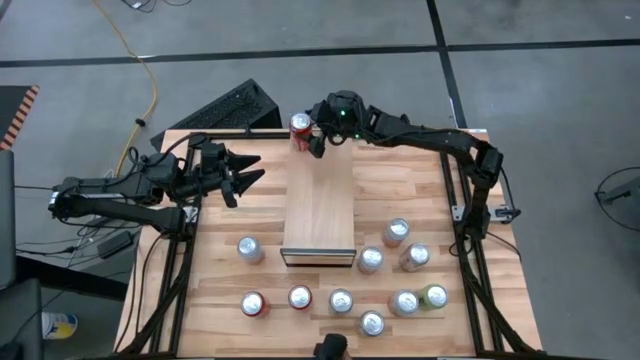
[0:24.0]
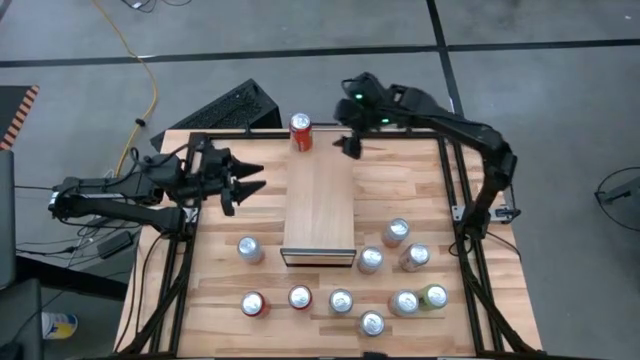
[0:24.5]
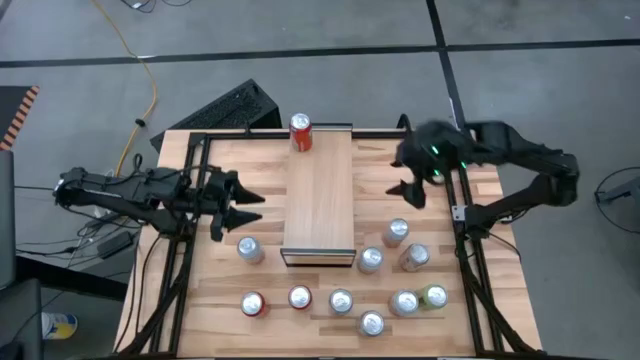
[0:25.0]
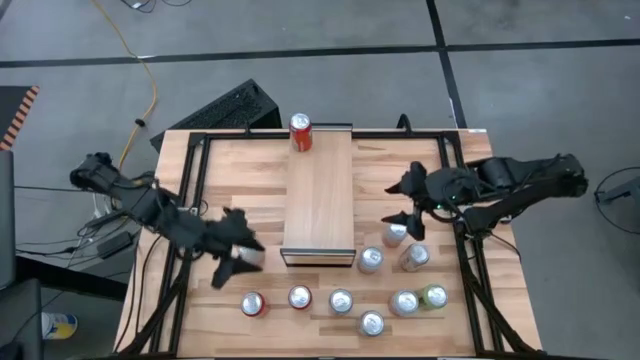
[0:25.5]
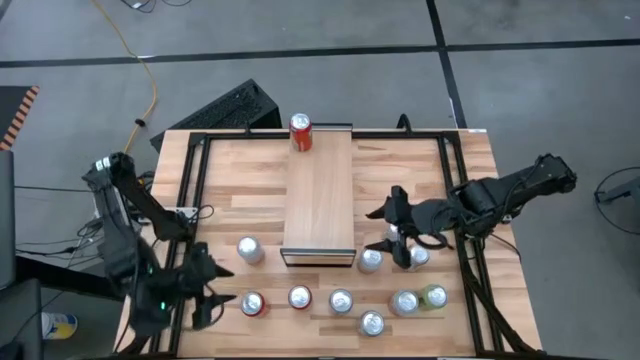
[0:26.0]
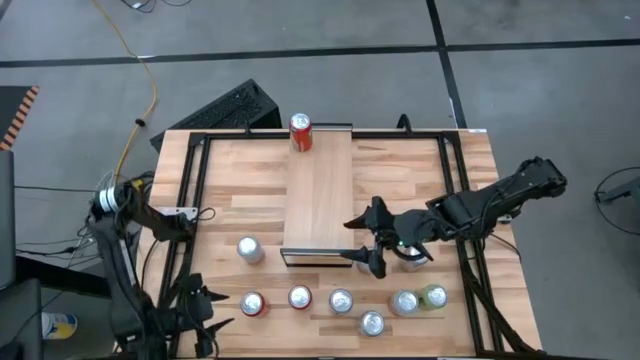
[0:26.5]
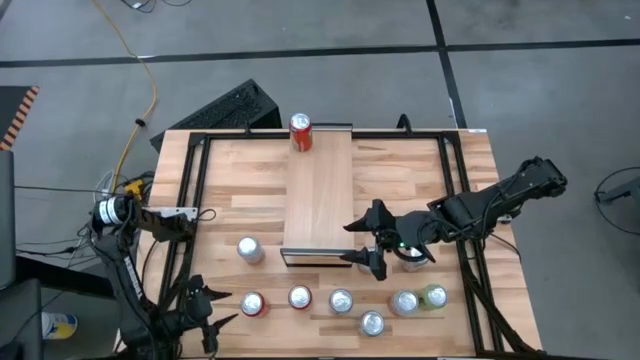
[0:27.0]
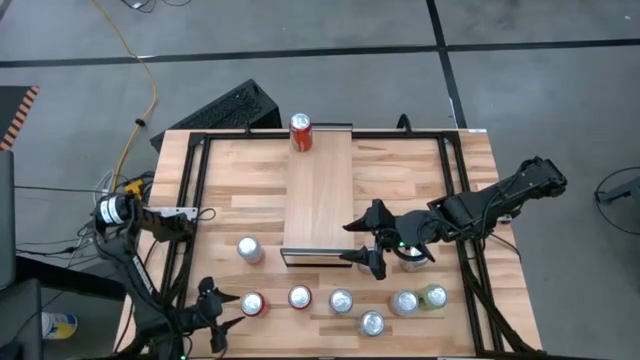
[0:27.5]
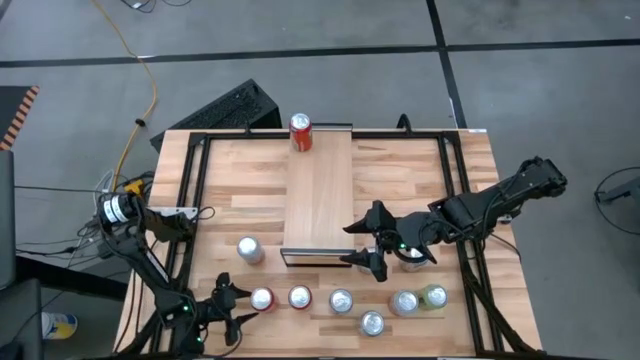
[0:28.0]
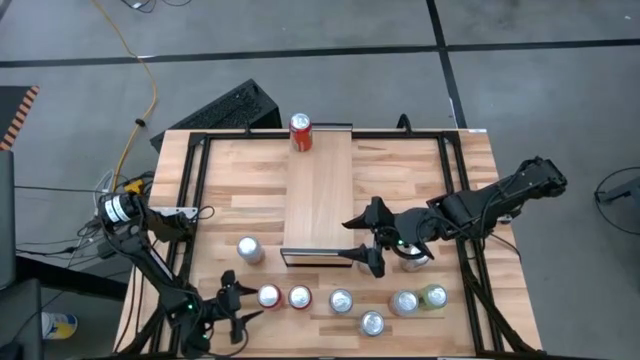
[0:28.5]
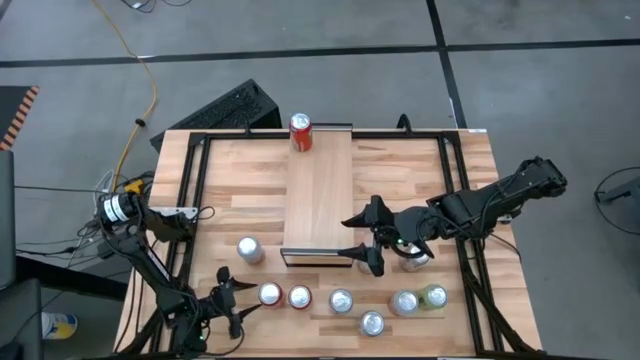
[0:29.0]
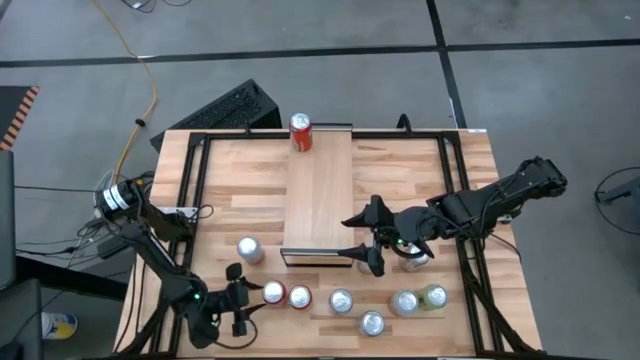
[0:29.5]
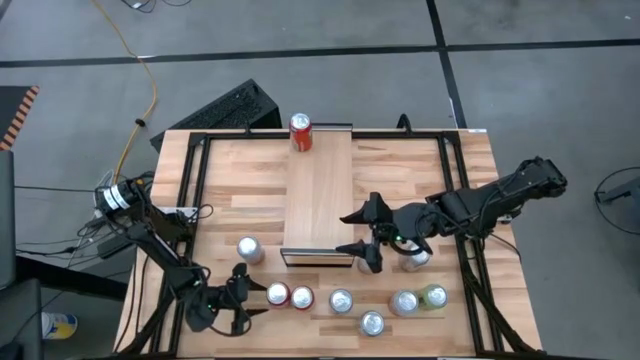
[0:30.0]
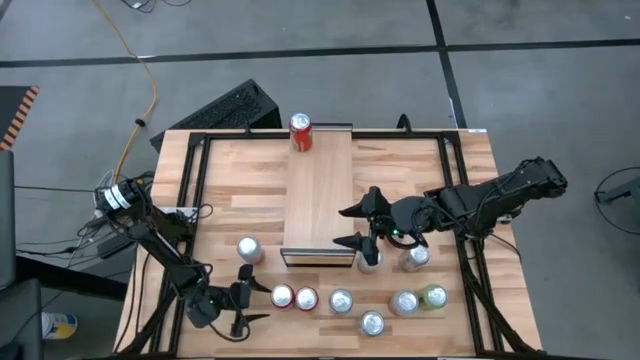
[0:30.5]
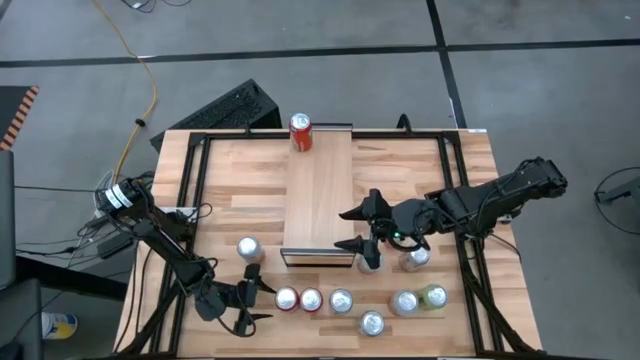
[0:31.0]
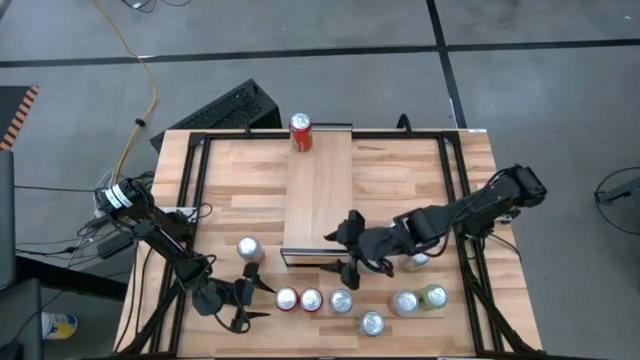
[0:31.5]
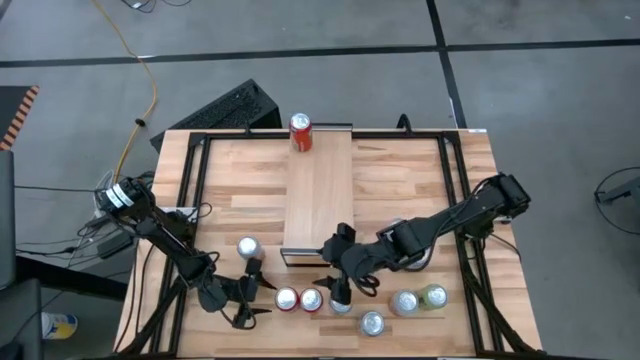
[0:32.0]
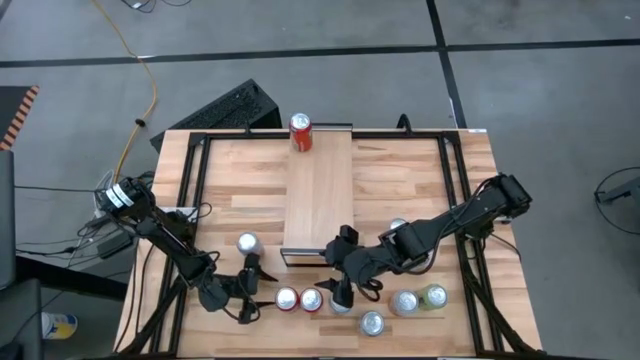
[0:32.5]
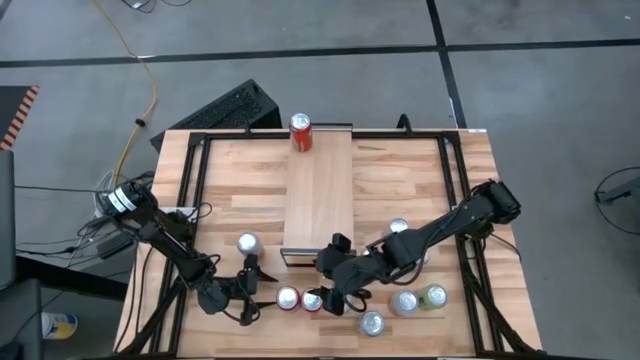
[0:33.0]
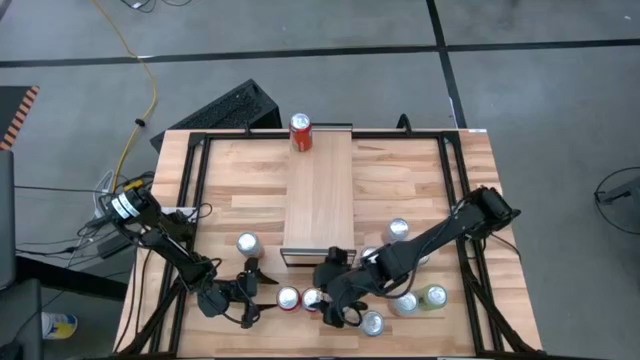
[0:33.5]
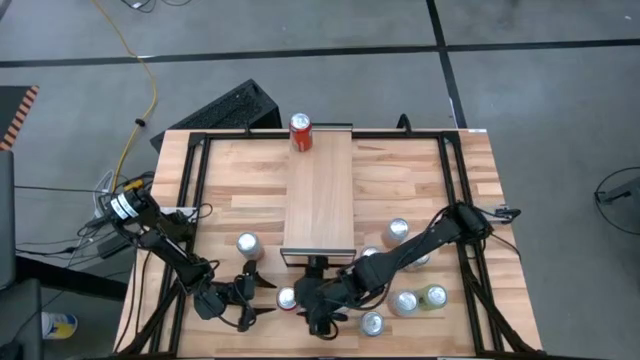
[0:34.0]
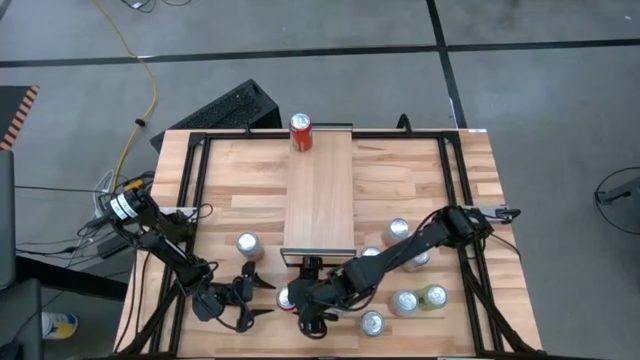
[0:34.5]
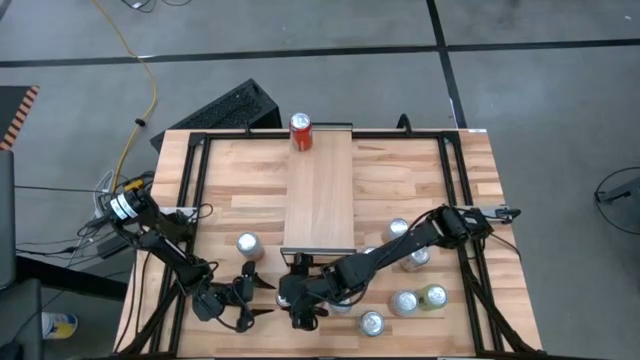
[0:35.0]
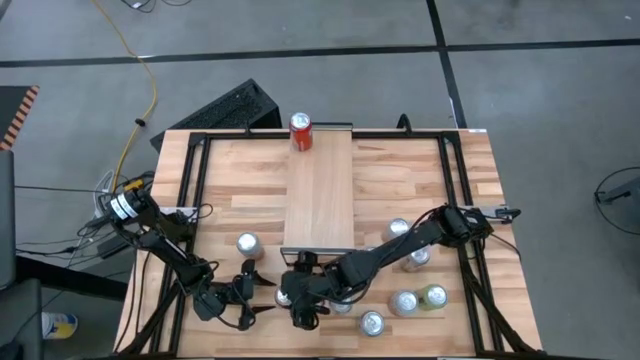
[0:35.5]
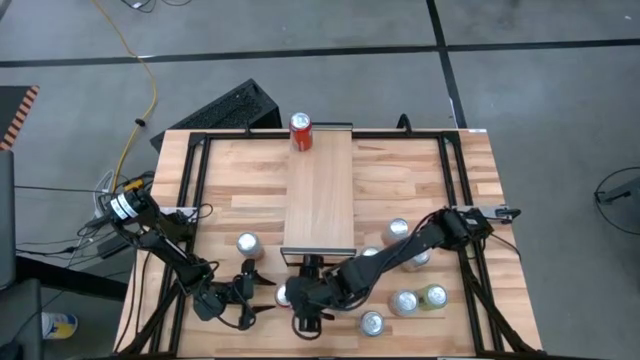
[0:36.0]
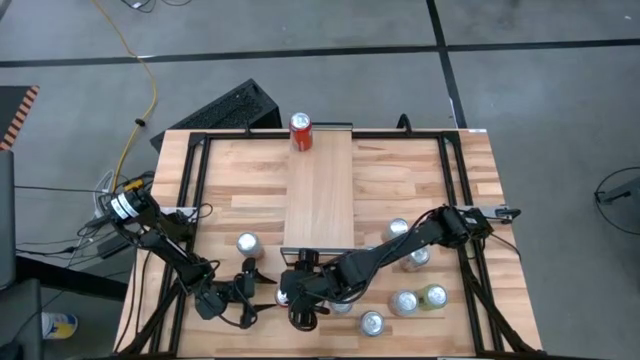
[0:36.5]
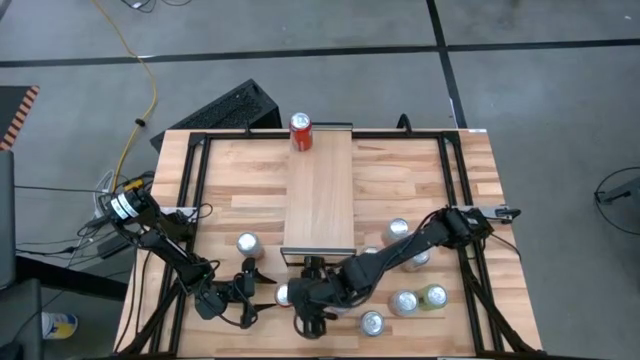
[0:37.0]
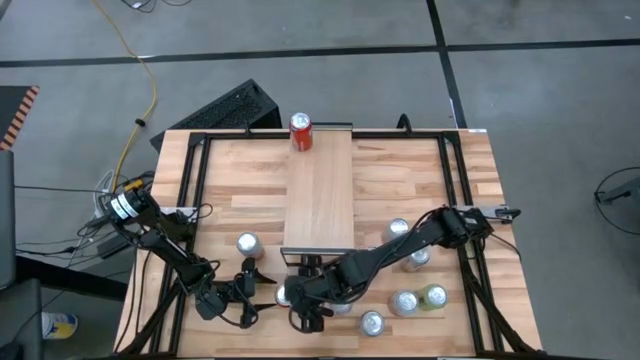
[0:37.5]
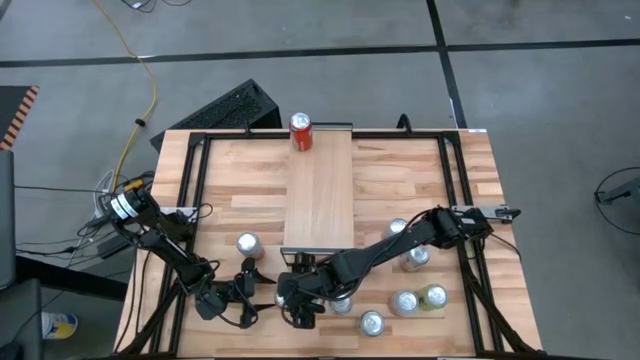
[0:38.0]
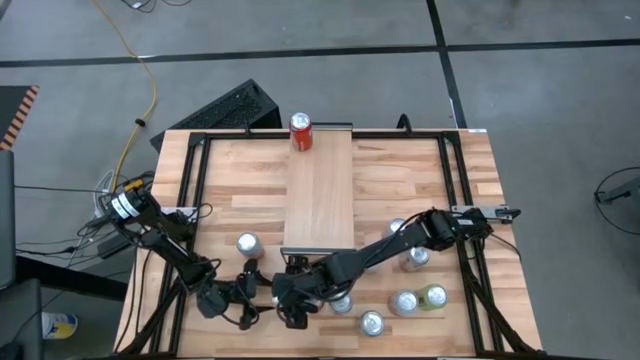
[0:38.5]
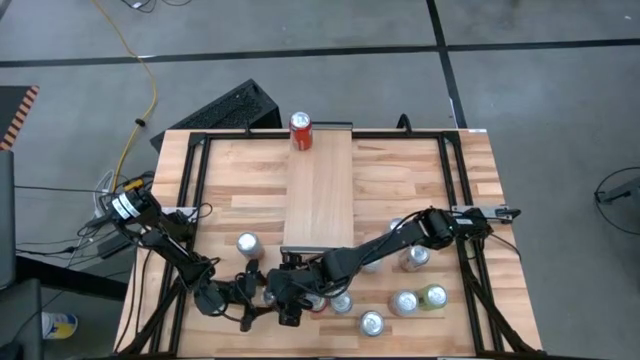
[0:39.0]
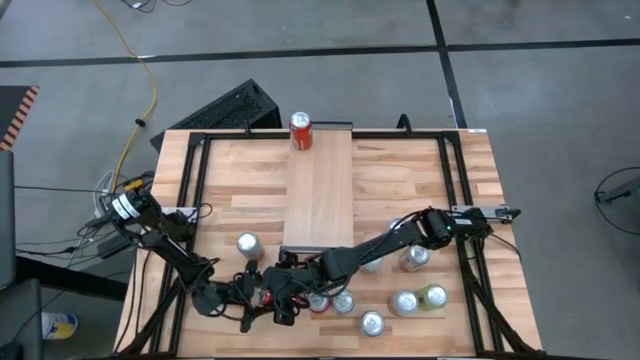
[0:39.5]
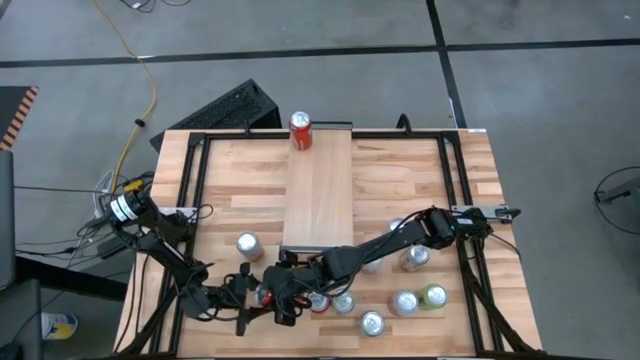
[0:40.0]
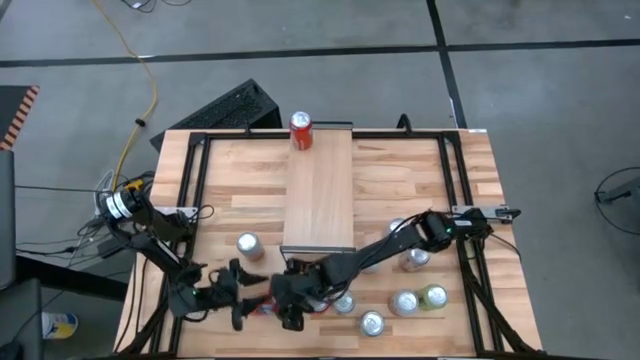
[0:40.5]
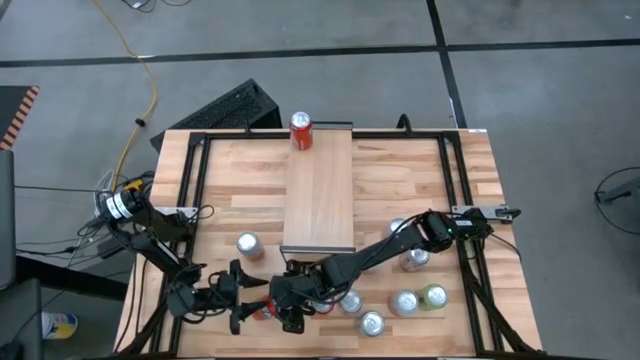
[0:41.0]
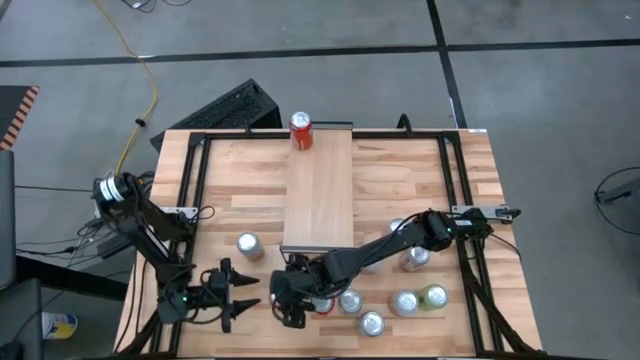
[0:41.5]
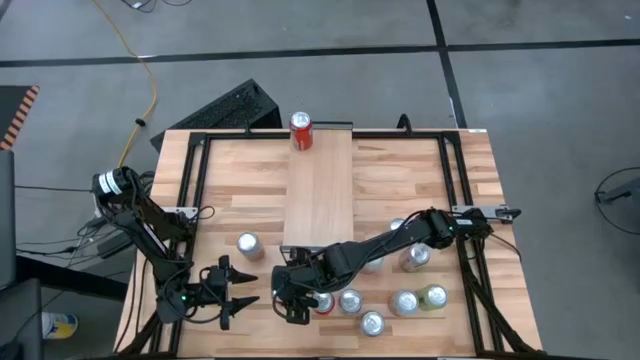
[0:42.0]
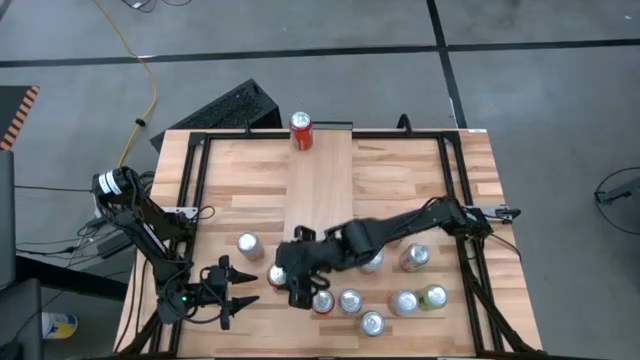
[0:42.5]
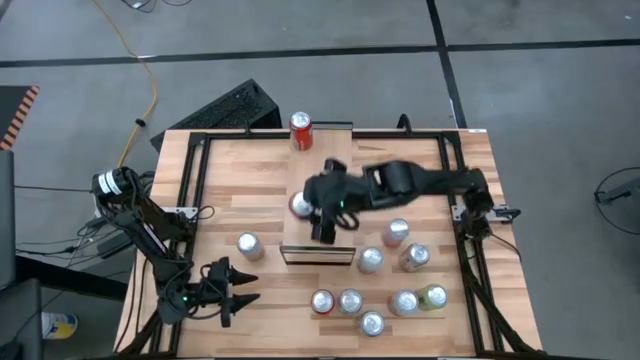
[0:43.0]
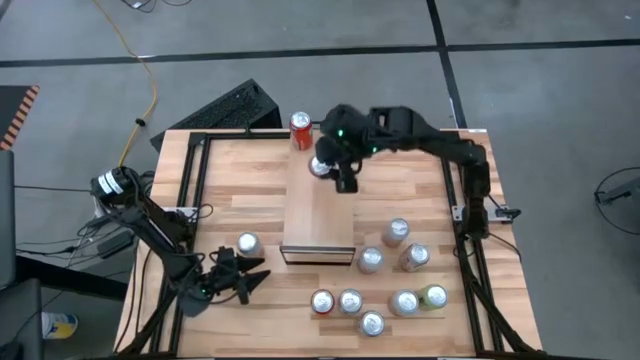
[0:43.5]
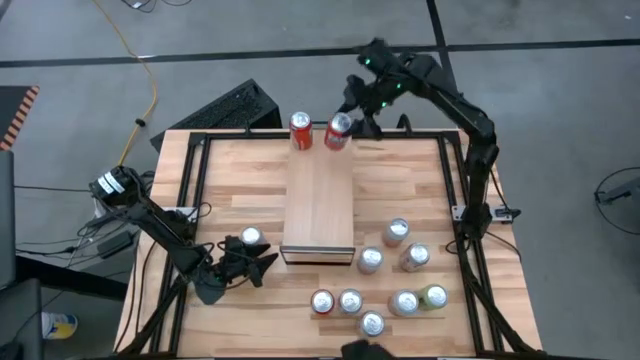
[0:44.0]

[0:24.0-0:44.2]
Task: Place canned beverage on shelf
Put the left red soda can on the shelf aligned with the other red soda can

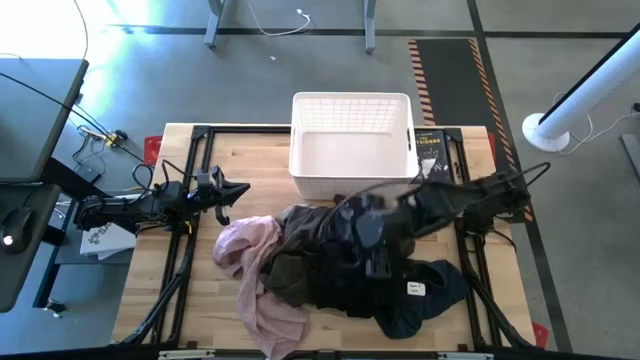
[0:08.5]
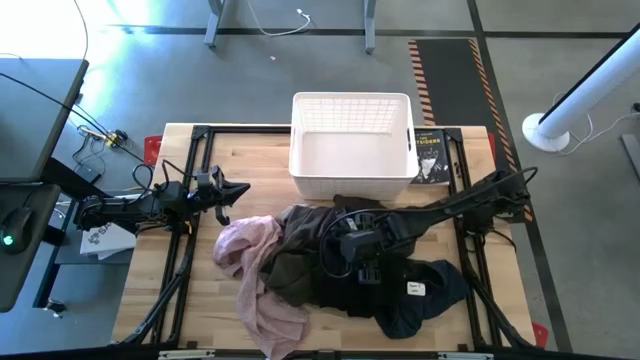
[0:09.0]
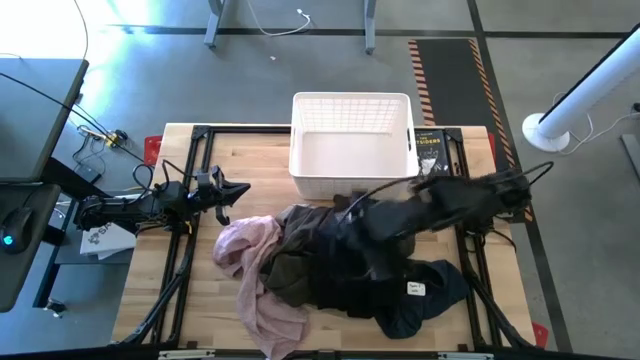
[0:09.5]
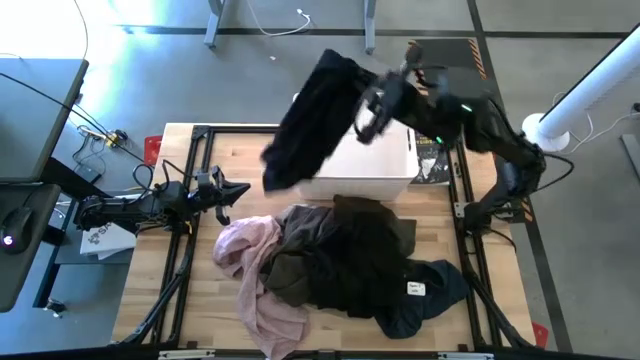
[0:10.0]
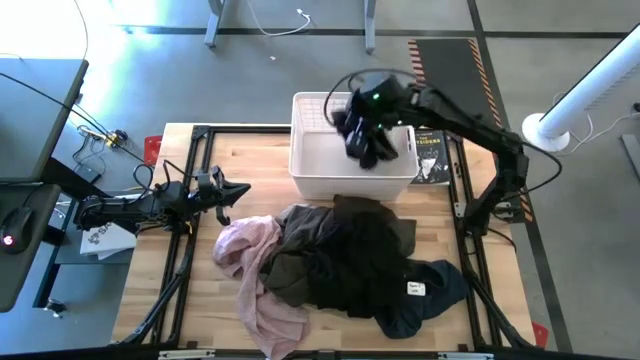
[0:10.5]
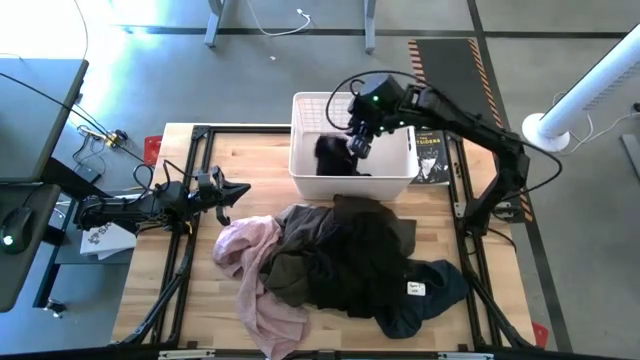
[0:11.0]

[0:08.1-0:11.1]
Task: Sort clothes
Put the black boxer shorts into the laundry bin
